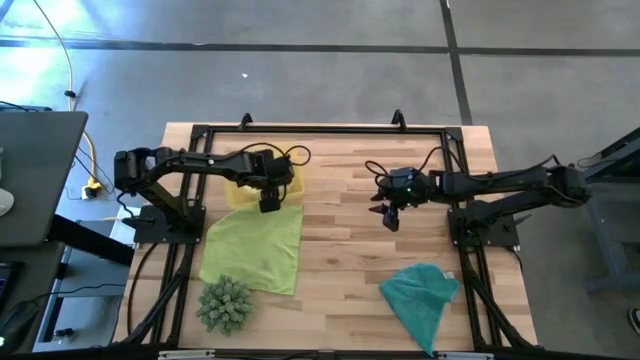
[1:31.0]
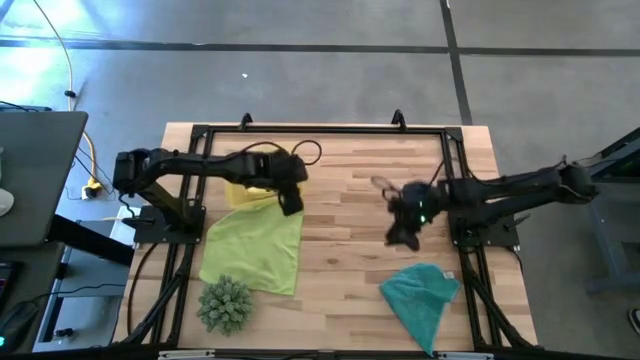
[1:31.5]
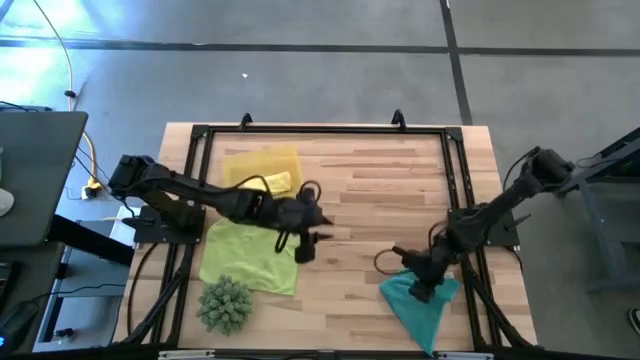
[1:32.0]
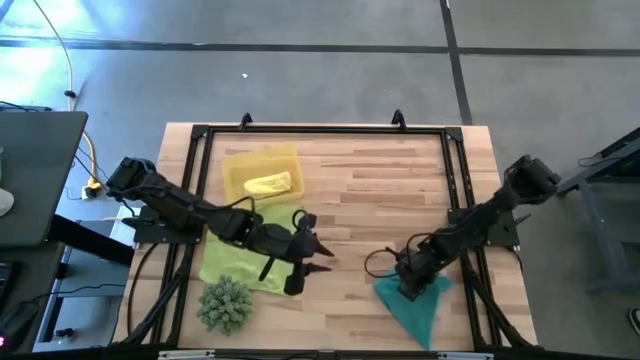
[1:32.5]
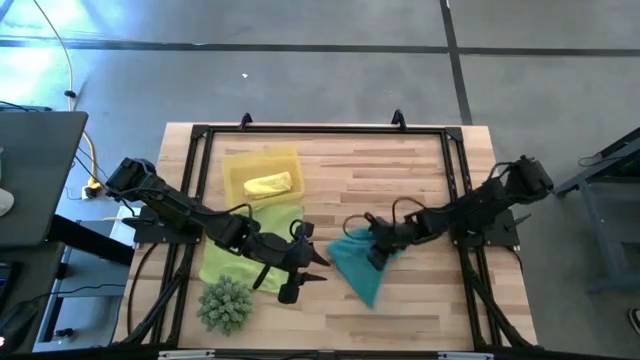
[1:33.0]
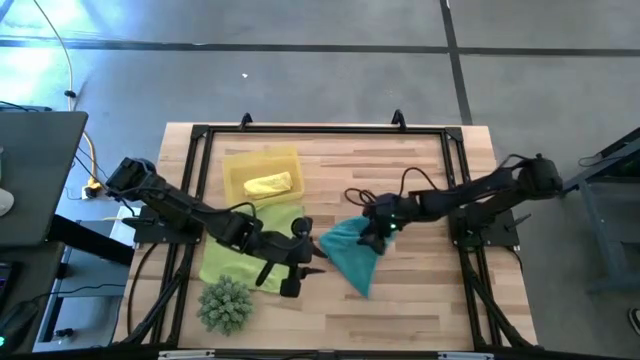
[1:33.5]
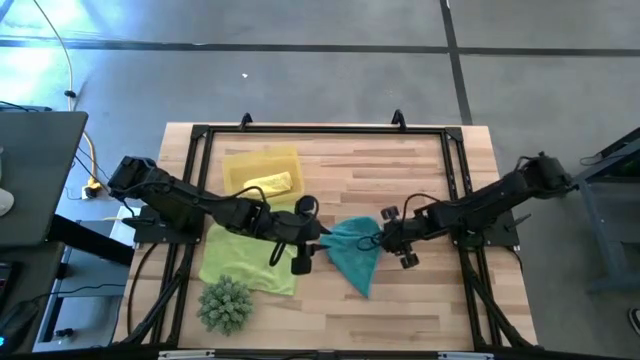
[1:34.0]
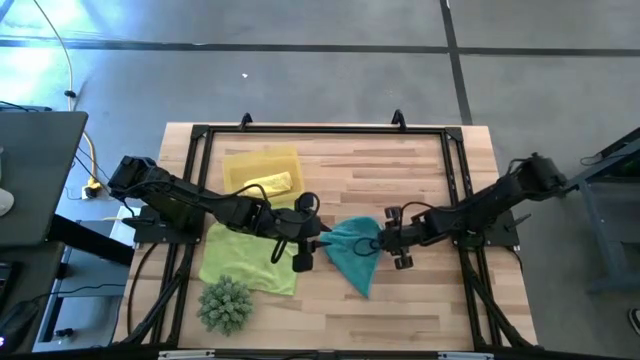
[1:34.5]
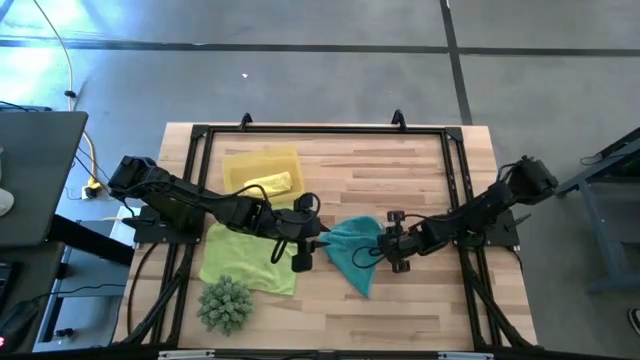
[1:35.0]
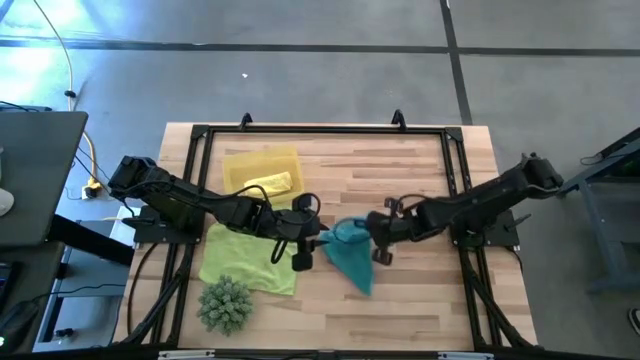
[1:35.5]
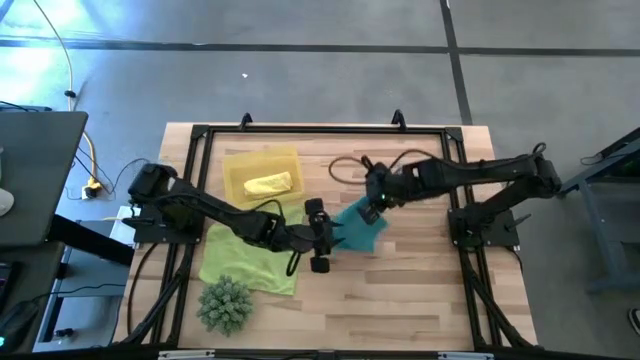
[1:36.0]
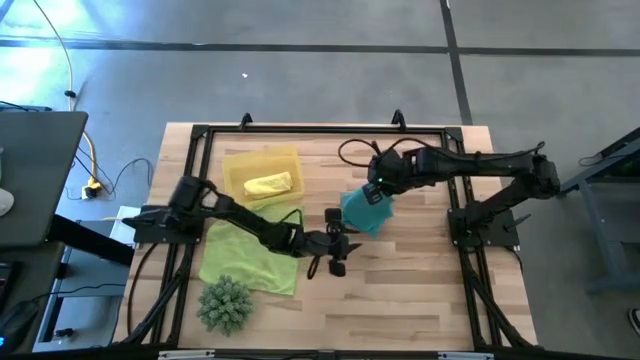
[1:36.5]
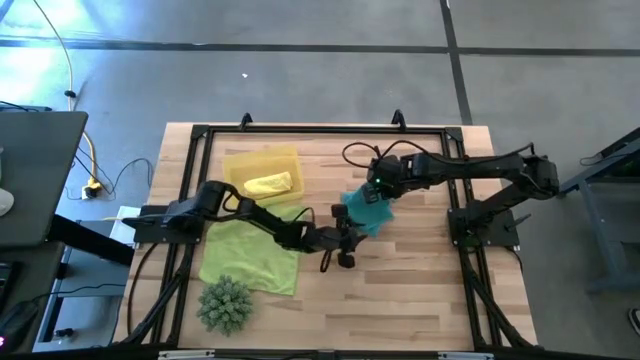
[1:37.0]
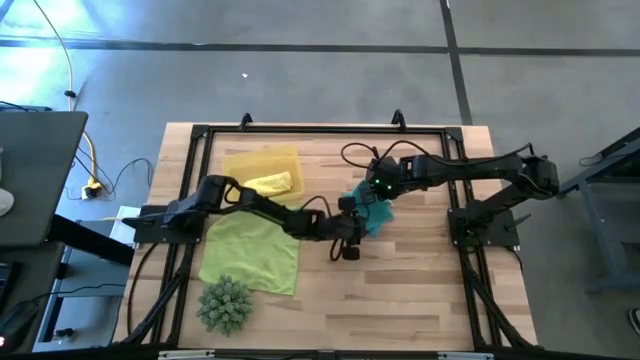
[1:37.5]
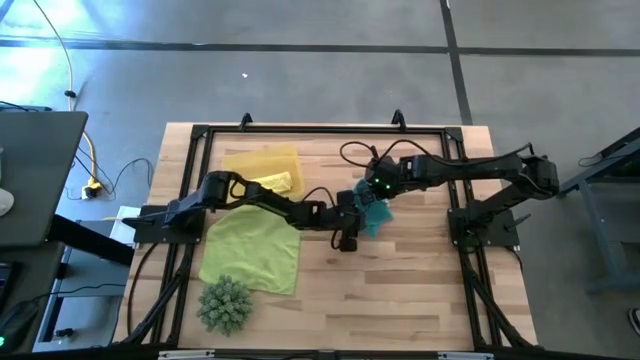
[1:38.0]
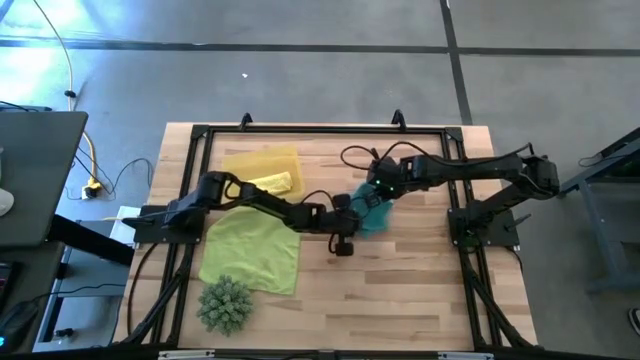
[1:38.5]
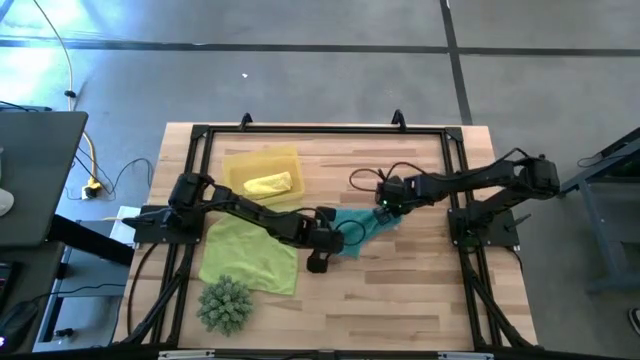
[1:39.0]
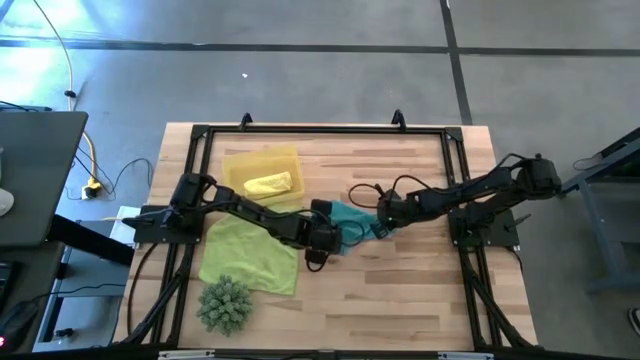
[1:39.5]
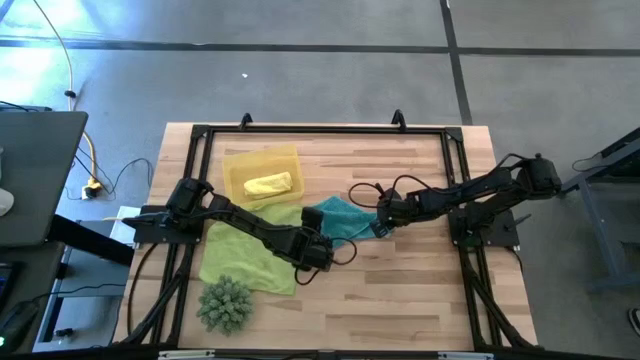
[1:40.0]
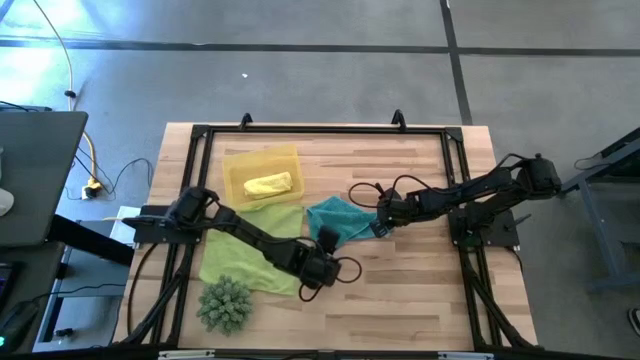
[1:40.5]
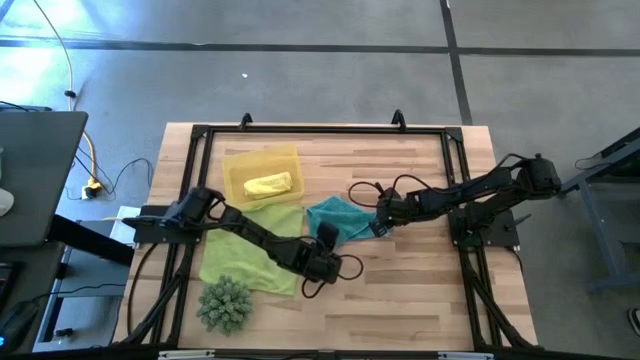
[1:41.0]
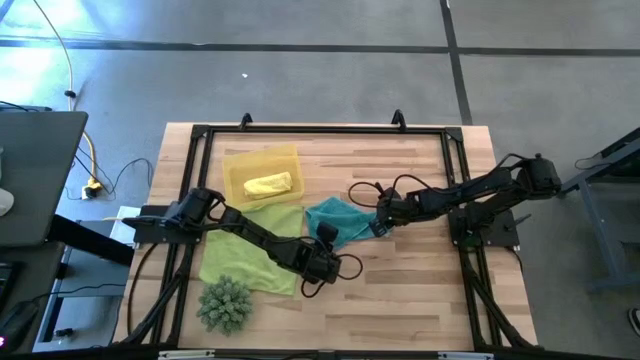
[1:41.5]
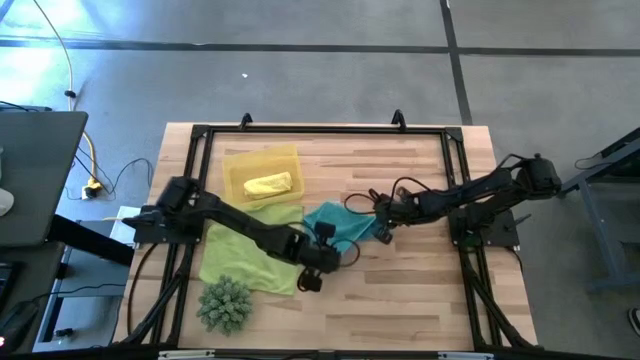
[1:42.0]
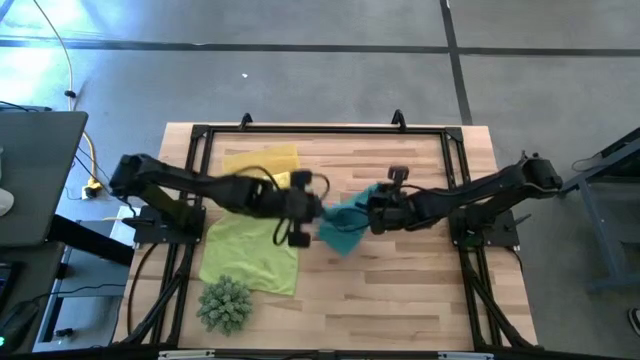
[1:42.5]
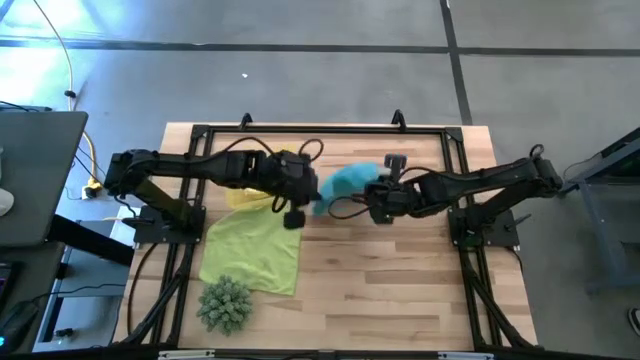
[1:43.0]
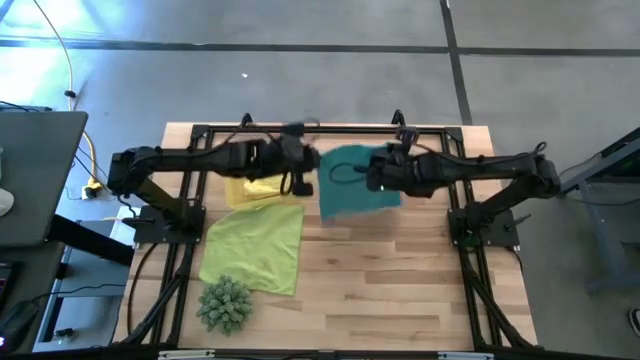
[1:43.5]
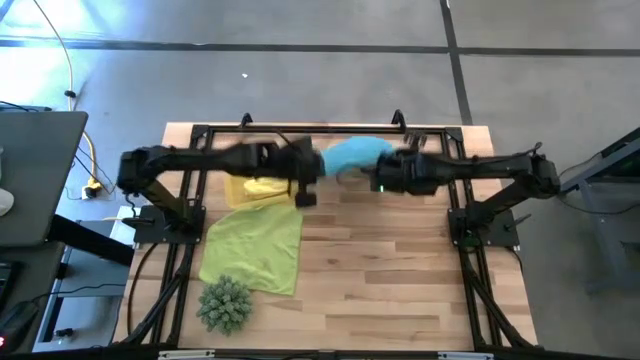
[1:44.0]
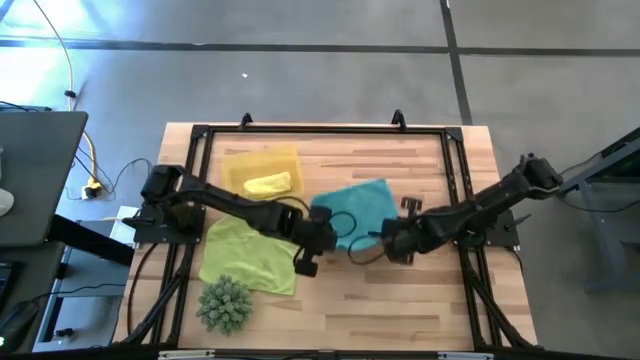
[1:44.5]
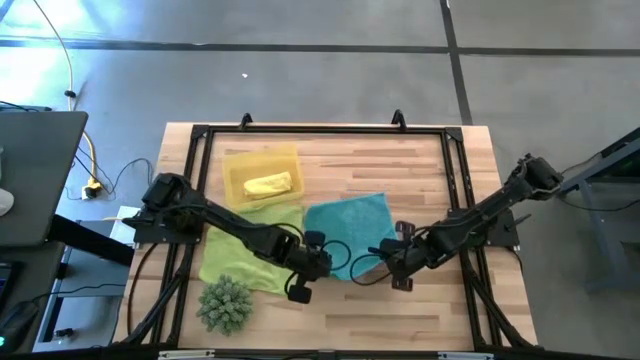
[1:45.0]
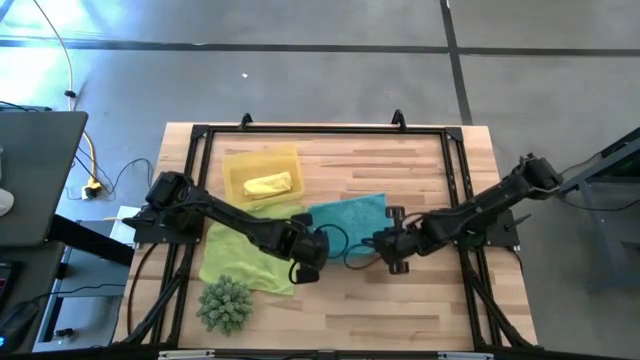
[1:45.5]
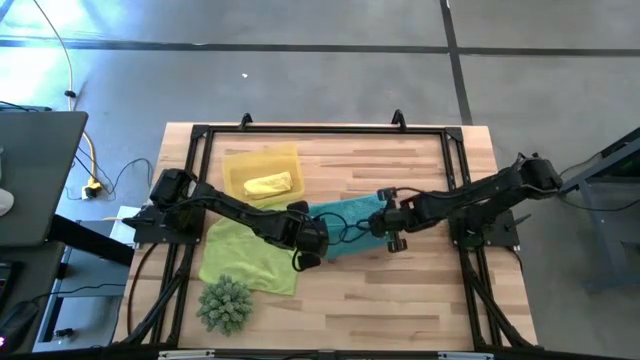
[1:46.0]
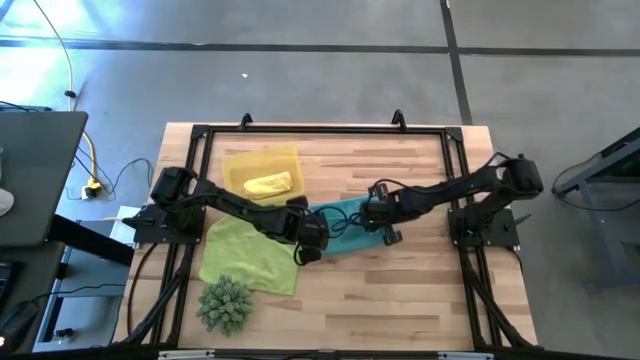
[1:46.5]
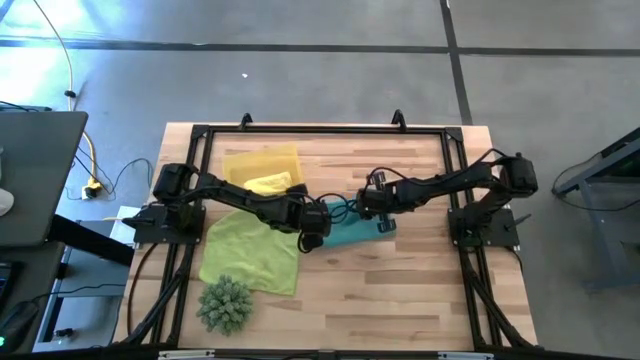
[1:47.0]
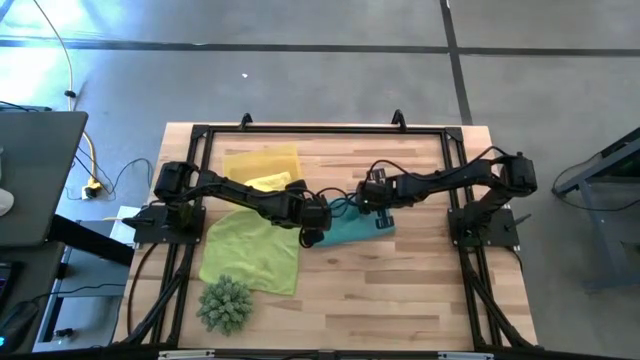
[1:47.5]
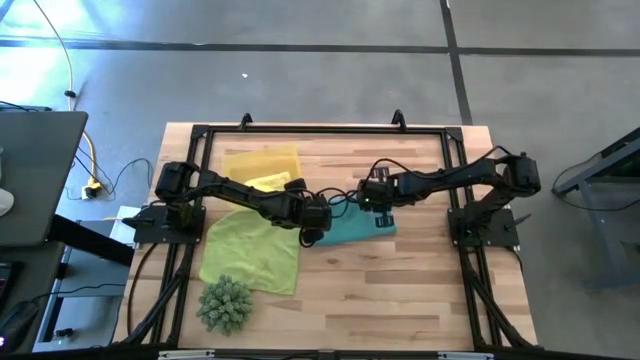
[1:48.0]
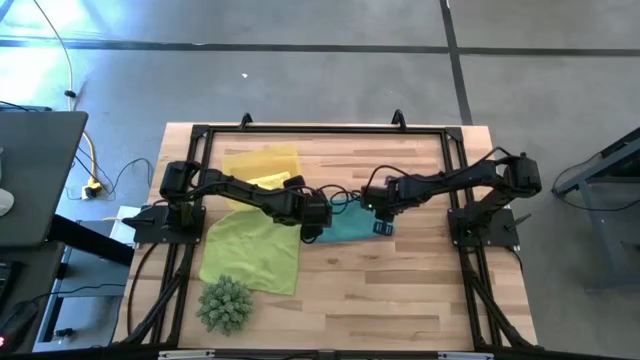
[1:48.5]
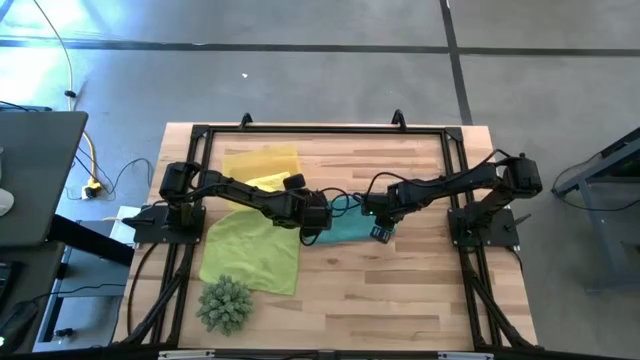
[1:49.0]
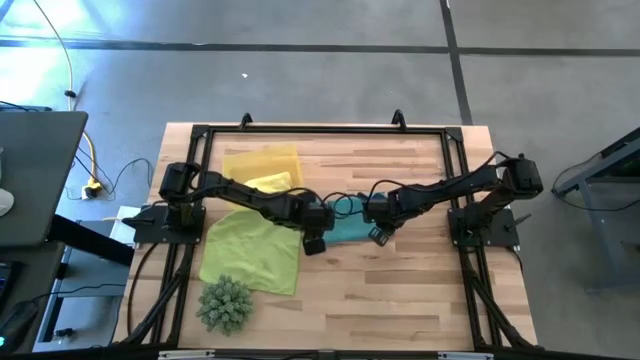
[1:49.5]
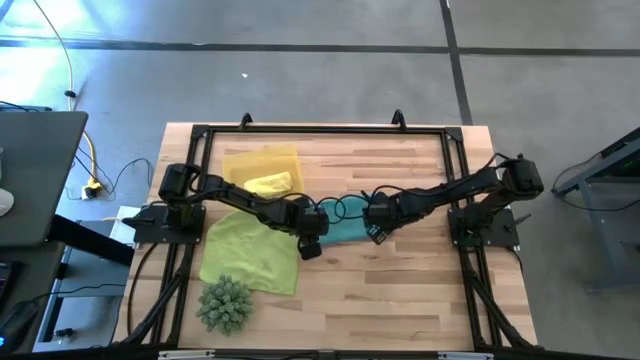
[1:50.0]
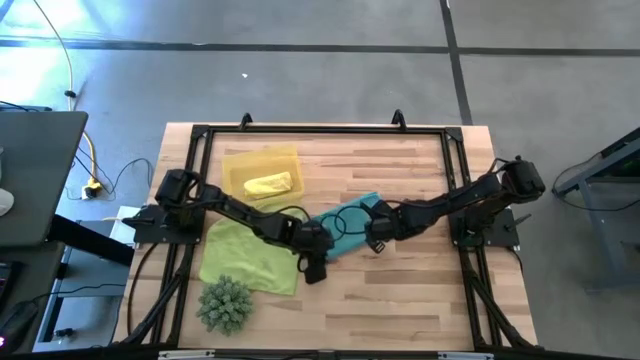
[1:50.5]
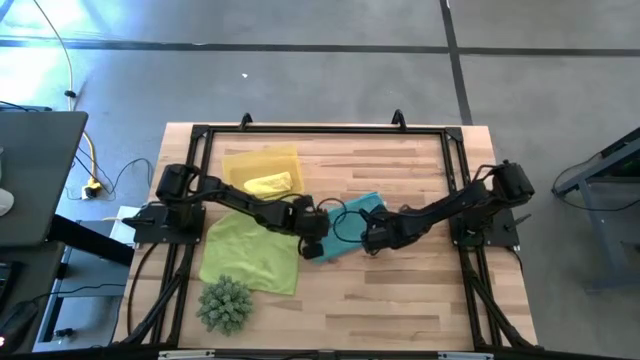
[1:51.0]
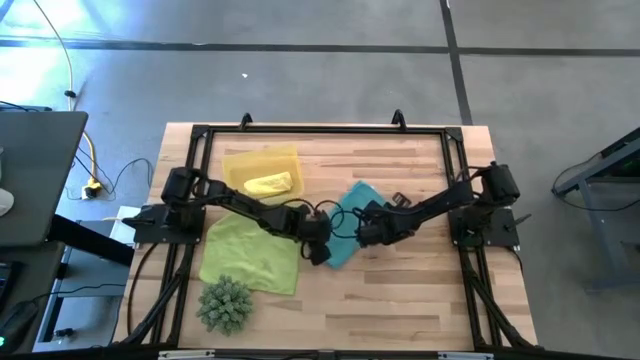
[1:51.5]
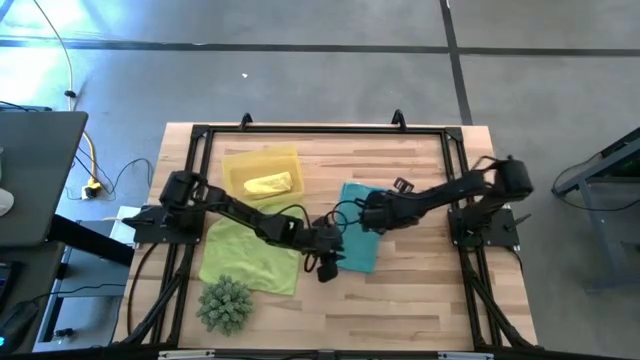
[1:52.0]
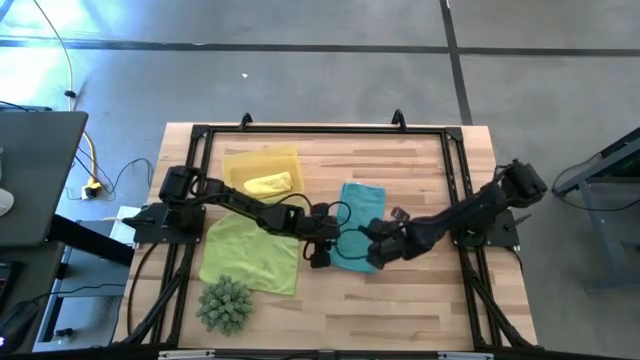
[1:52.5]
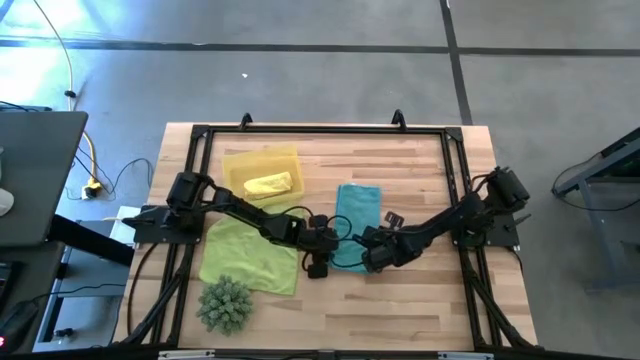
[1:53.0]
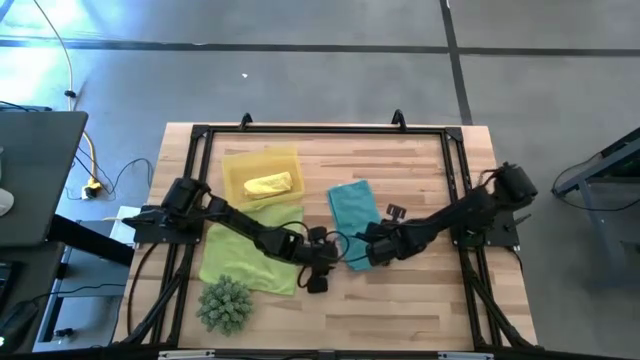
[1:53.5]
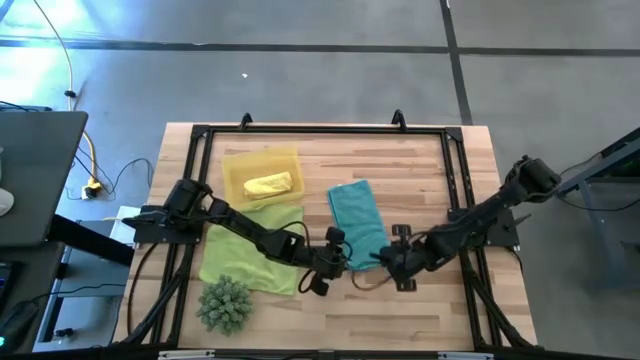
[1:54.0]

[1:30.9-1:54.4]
Task: Roll microfiber towels into tight, uniform cylinder then place into a basket
Roll the blue microfiber towel
